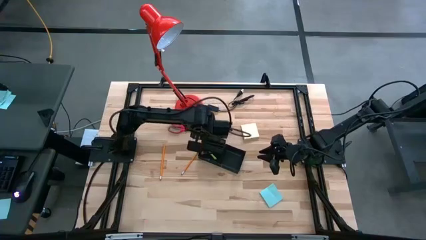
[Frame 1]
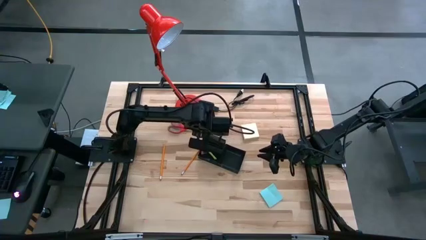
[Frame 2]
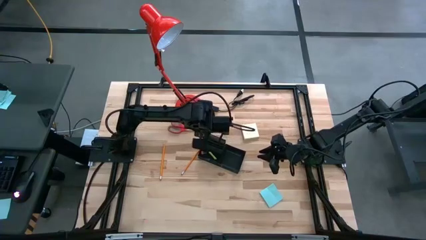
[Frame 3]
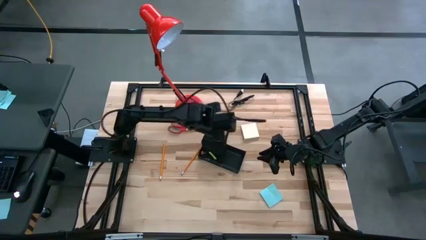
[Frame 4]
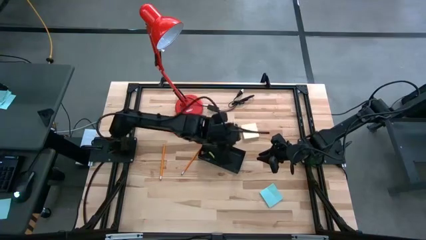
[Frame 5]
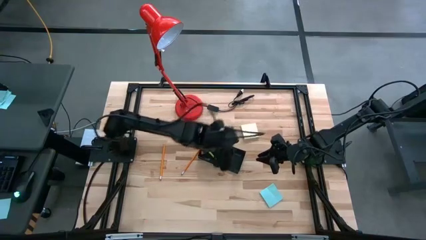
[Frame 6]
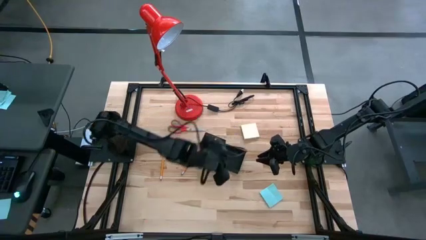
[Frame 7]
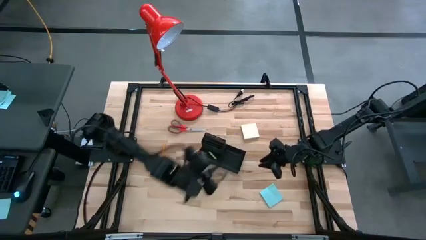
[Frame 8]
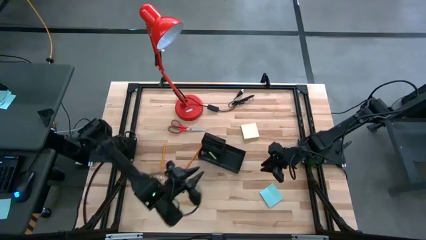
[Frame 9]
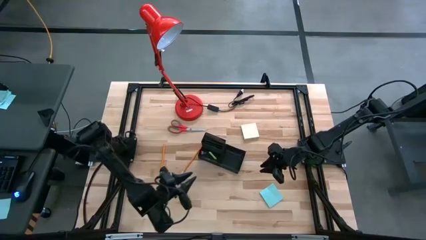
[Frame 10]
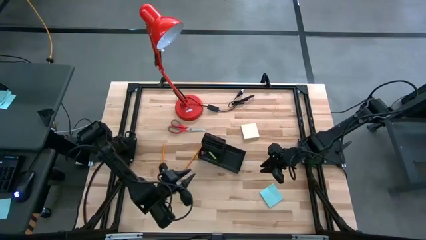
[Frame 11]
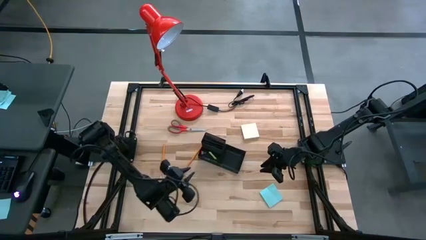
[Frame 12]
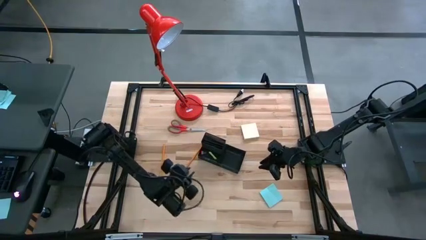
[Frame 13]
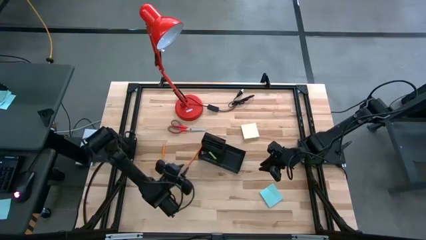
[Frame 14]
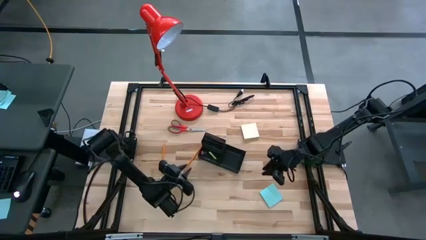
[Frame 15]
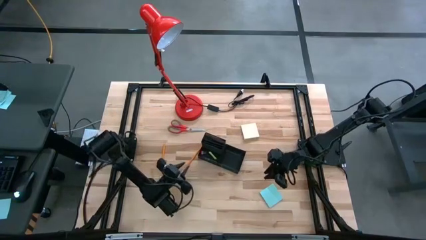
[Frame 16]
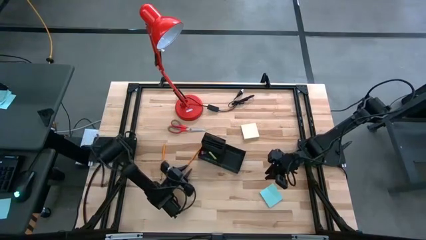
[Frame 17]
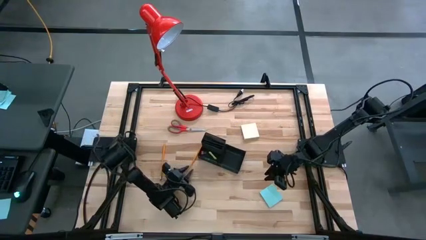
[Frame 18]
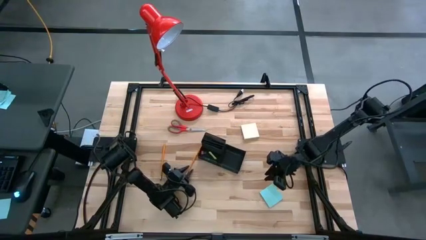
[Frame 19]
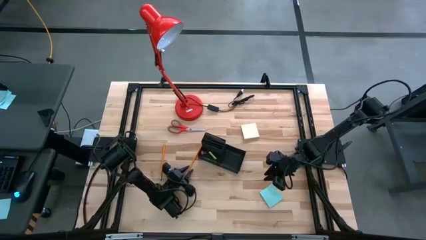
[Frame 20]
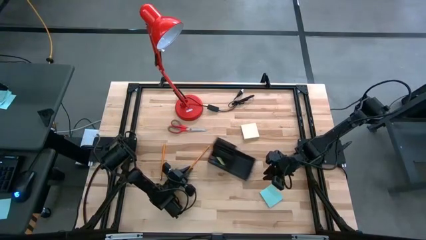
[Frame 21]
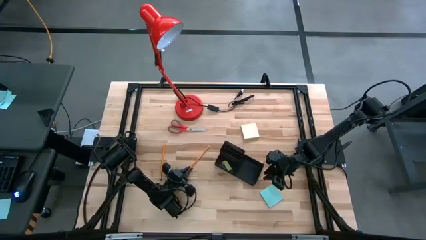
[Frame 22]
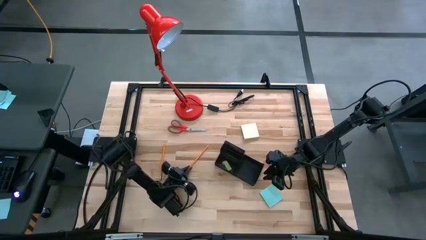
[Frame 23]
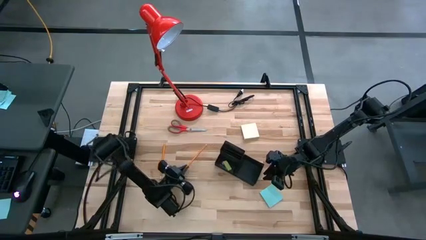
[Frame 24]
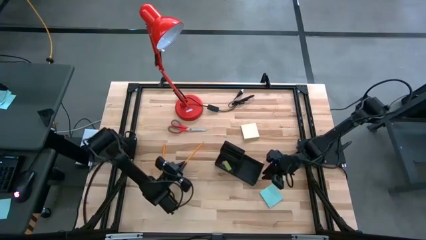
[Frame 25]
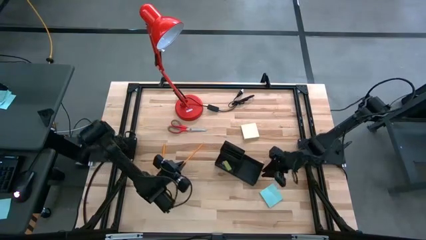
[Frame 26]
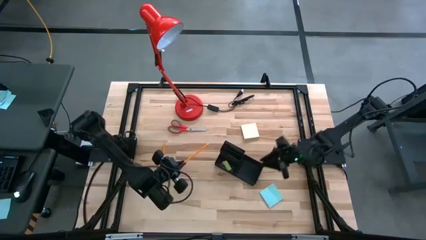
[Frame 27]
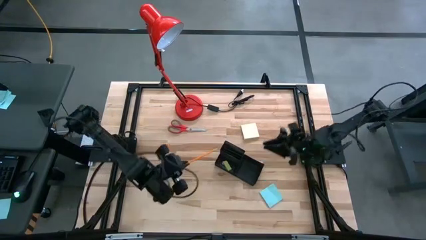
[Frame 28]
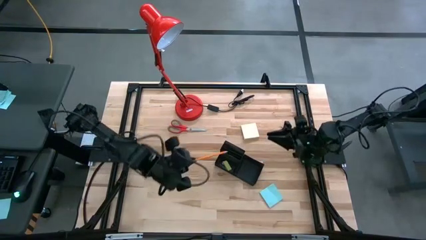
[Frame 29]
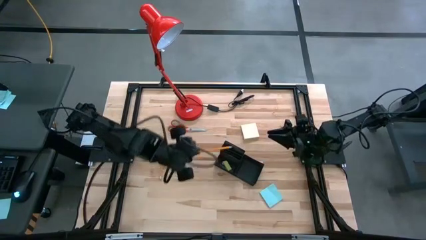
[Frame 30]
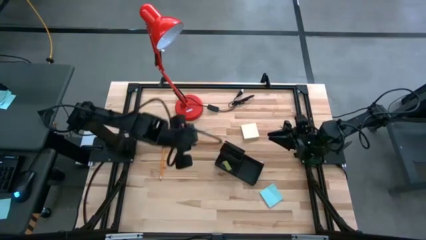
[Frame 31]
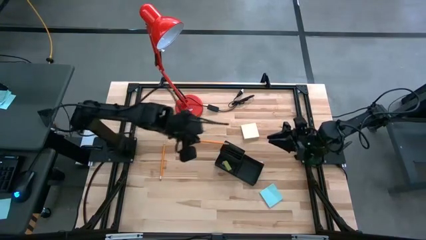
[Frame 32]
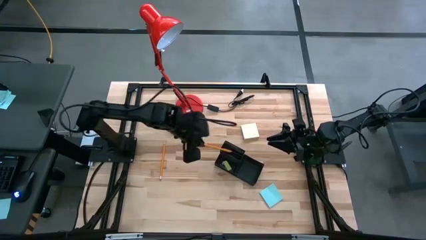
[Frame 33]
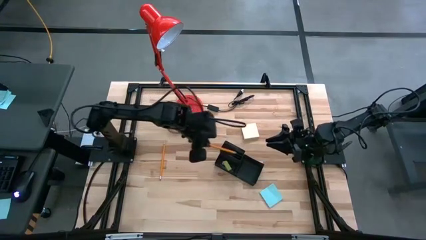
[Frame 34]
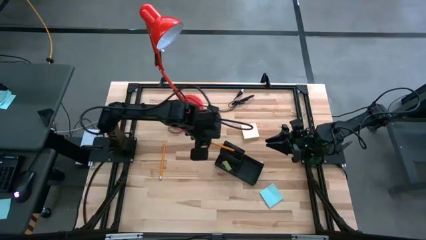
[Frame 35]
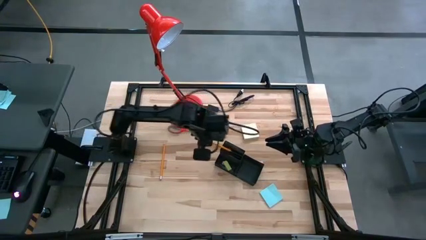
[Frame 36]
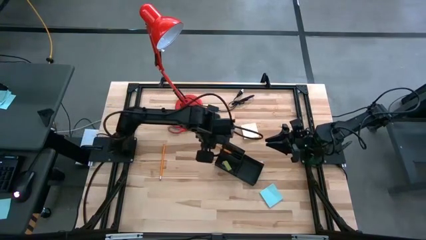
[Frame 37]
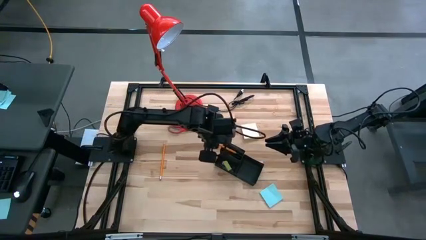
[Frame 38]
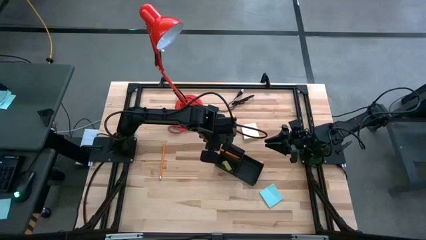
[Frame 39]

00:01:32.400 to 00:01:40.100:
Task: Pick and place office supplies into organizer
Put the right orange pencil into the black desk organizer

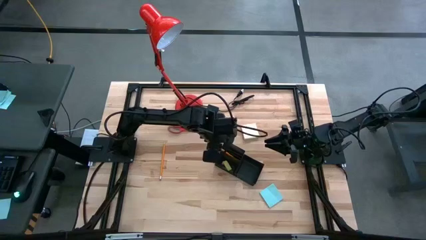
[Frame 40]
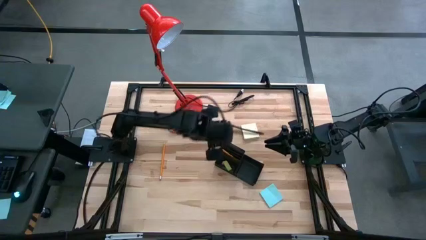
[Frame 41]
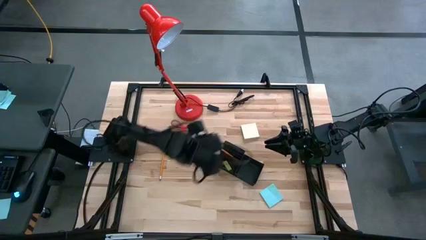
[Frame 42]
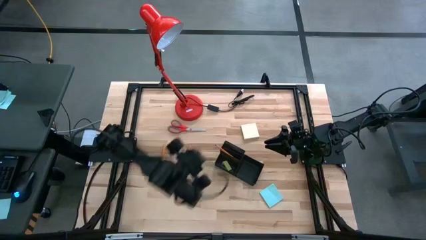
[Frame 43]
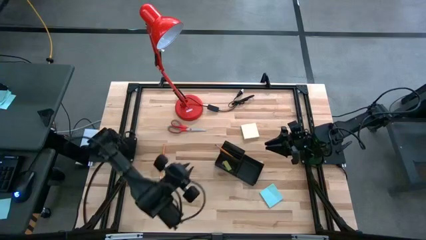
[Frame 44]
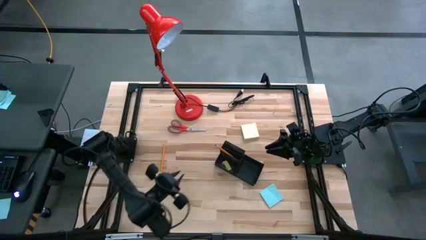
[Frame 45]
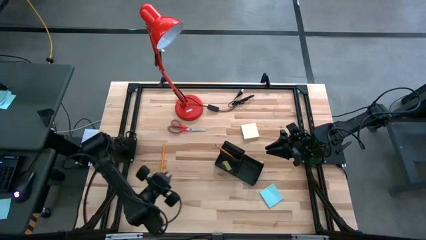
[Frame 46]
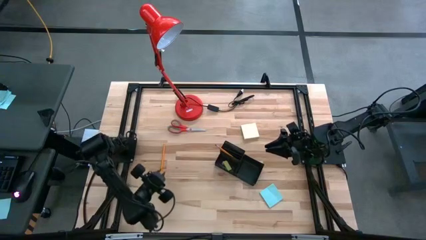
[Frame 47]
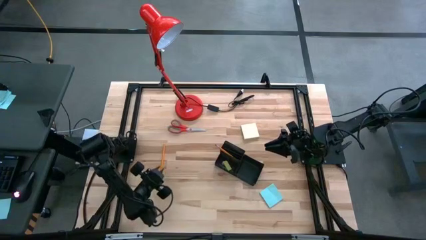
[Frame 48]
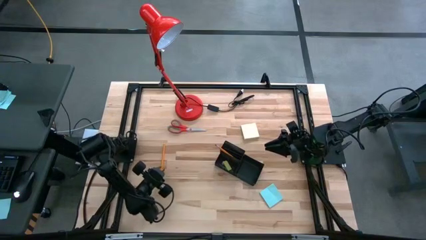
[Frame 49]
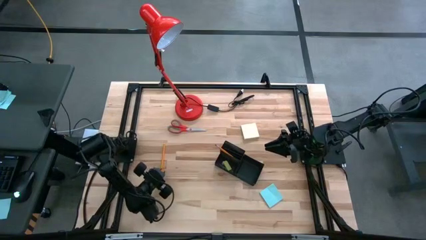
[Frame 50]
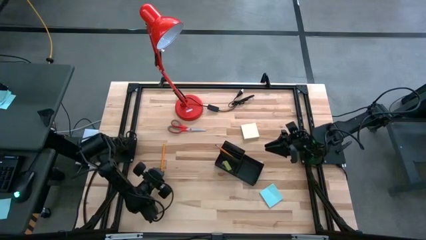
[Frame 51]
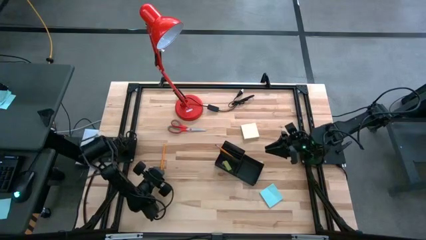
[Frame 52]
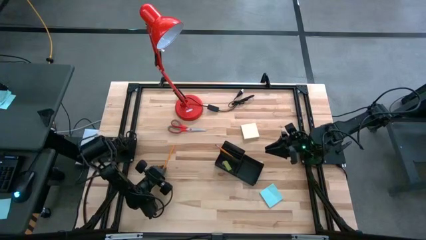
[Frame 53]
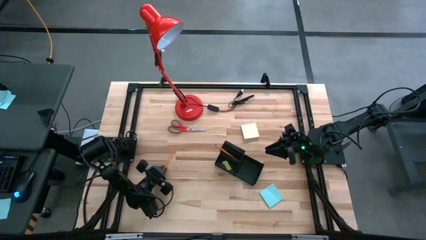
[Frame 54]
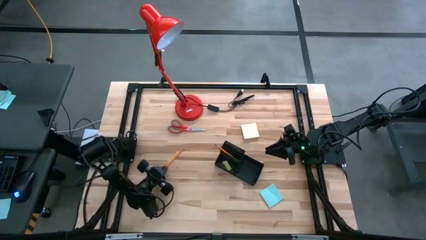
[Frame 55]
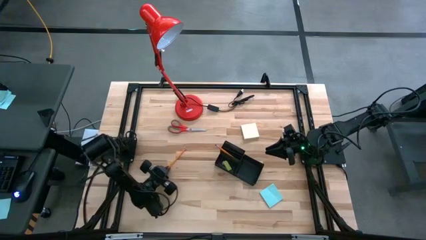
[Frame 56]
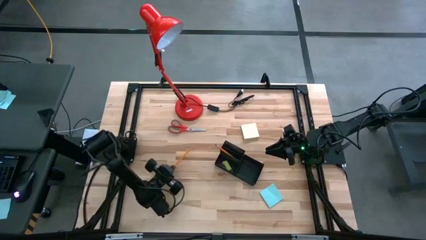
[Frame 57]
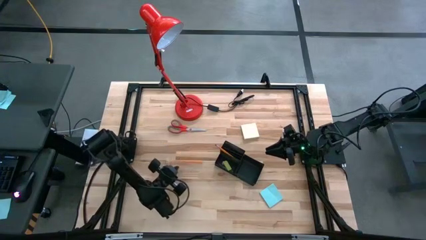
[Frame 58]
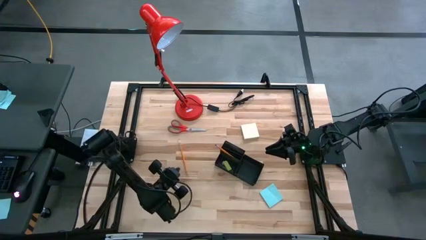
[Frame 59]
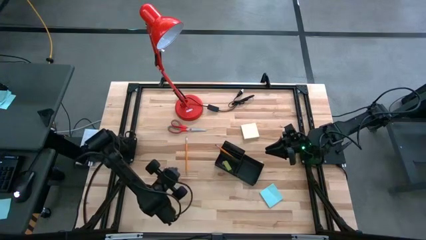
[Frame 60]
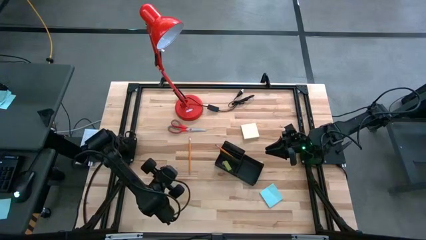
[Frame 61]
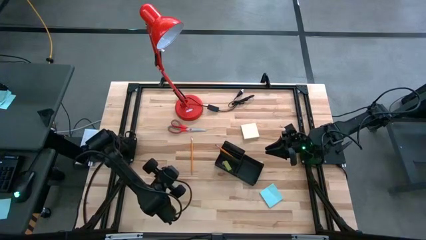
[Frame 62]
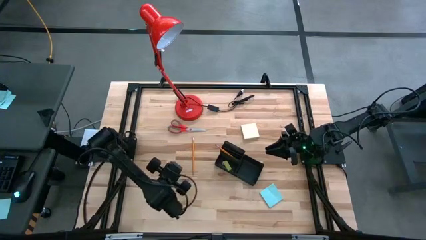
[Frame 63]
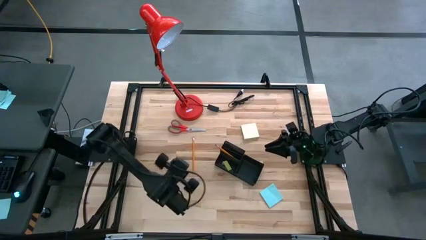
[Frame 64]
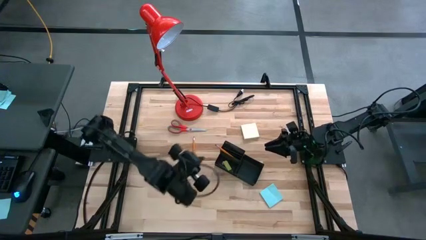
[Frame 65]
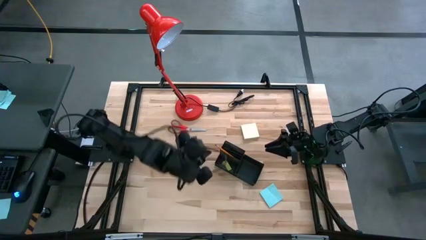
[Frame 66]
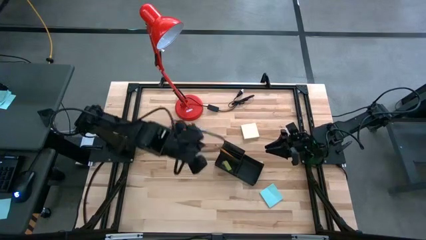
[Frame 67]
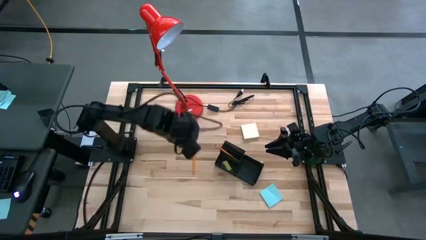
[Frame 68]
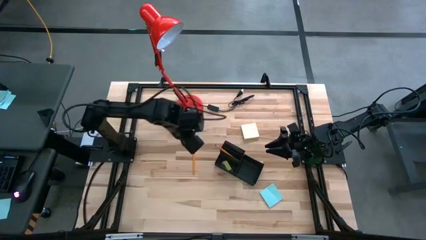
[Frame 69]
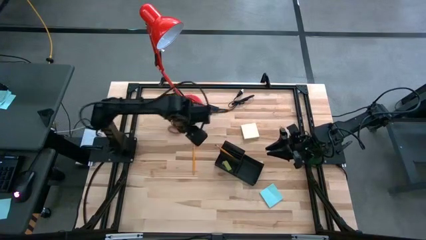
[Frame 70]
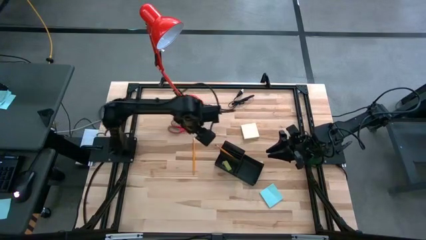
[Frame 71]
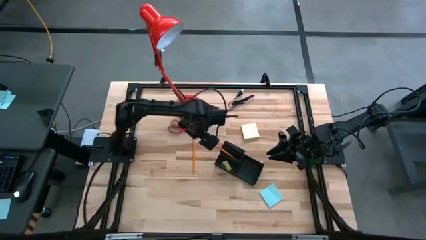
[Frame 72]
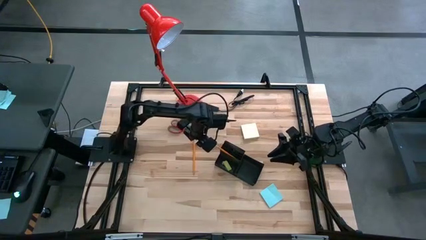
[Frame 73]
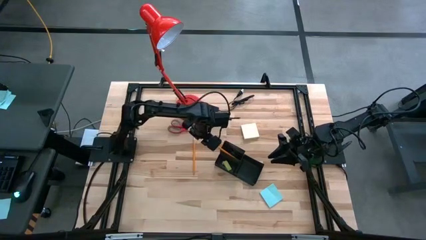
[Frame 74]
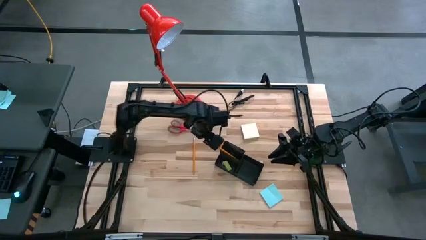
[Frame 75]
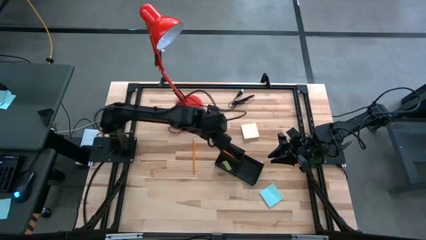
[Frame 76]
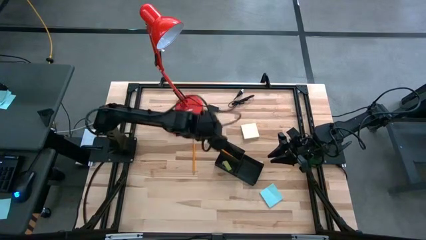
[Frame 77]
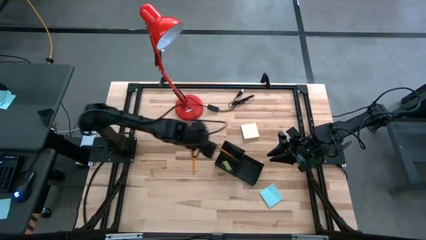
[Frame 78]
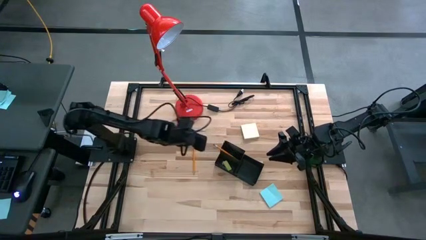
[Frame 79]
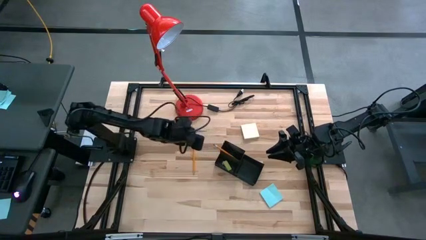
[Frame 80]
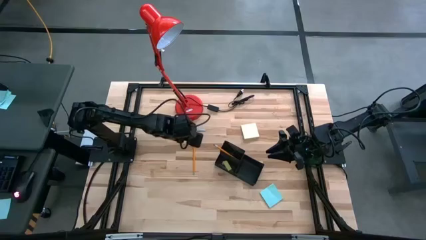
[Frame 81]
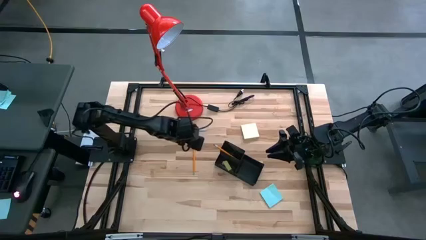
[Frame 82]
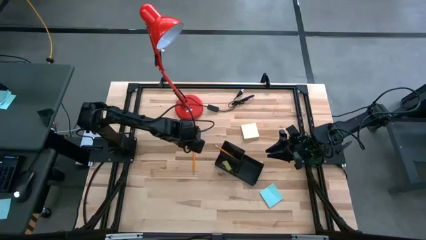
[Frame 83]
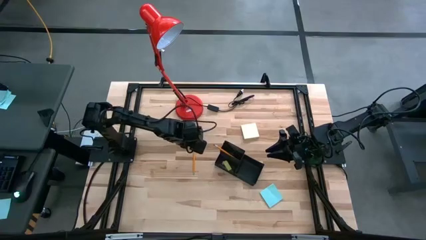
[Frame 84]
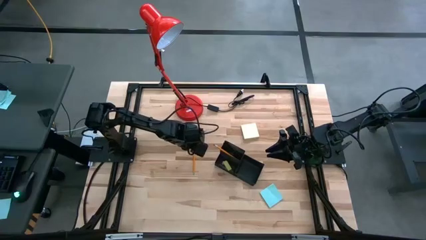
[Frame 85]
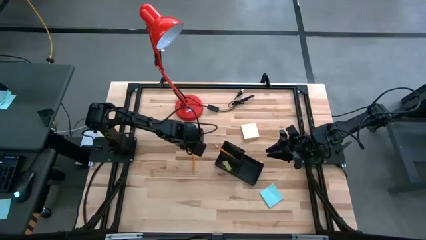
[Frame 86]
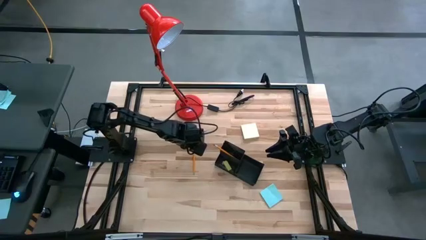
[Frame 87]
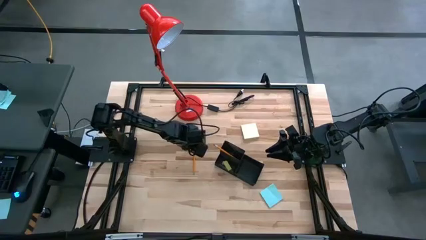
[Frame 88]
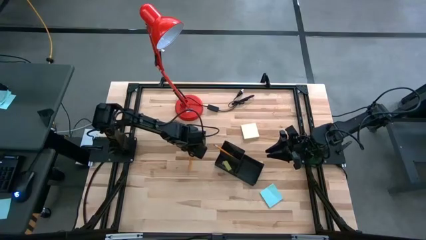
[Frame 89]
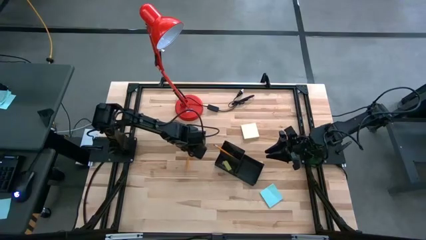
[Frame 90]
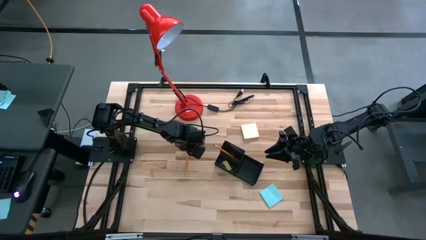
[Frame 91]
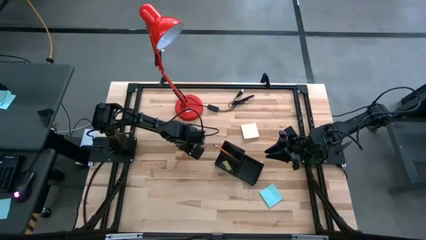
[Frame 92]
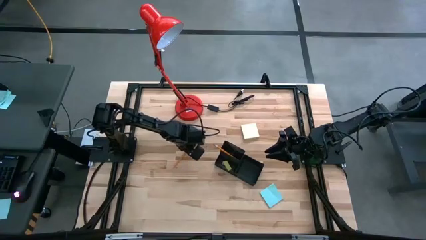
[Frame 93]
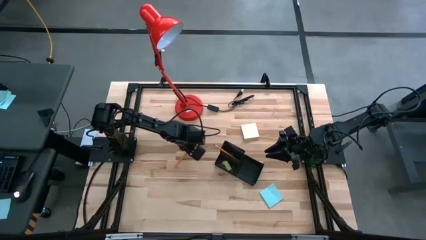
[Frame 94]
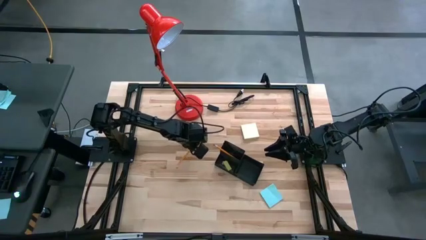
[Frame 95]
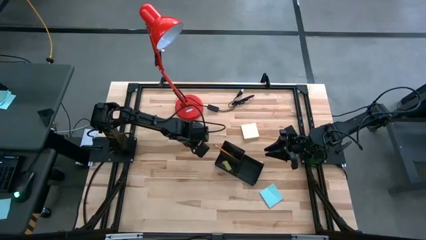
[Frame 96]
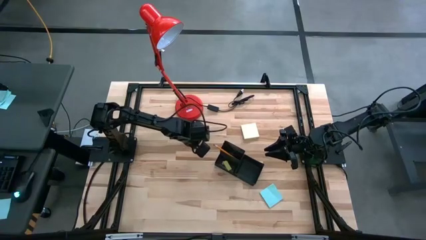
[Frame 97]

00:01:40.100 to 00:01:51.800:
Put the orange pencil into the black desk organizer
